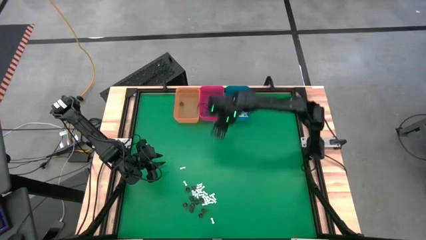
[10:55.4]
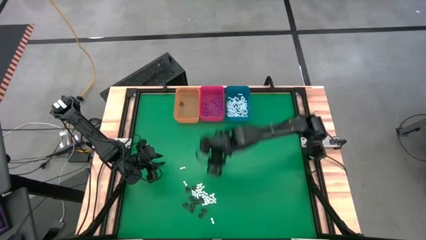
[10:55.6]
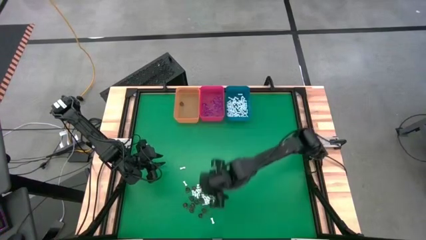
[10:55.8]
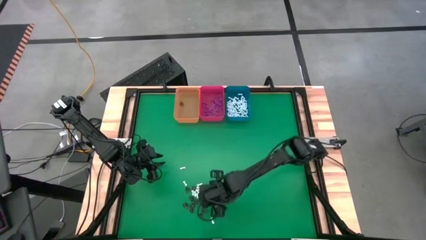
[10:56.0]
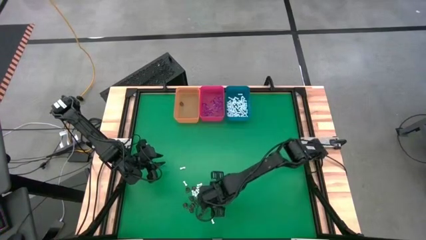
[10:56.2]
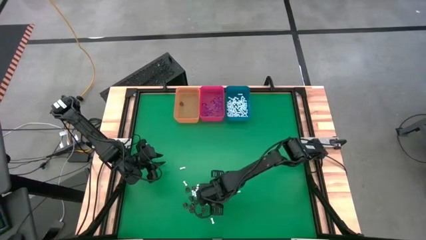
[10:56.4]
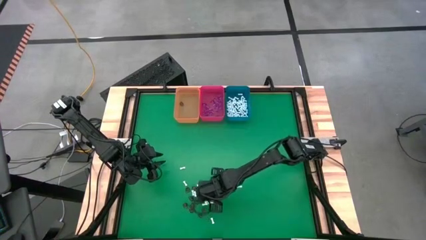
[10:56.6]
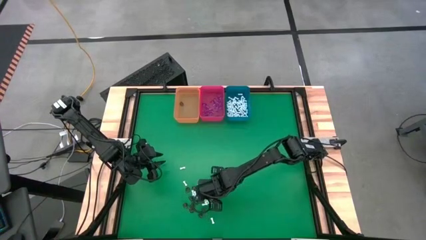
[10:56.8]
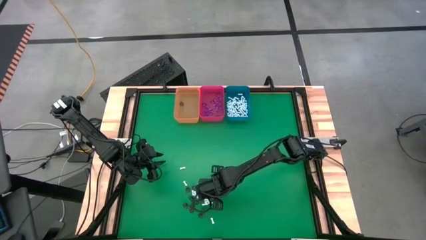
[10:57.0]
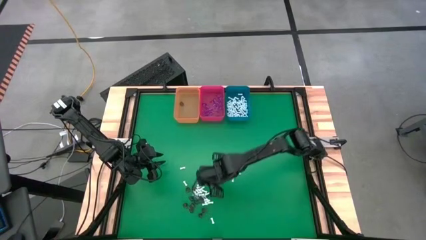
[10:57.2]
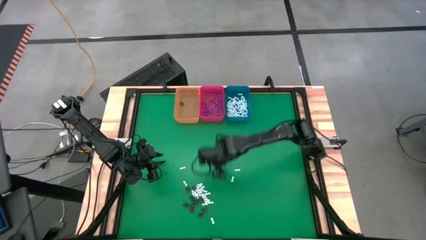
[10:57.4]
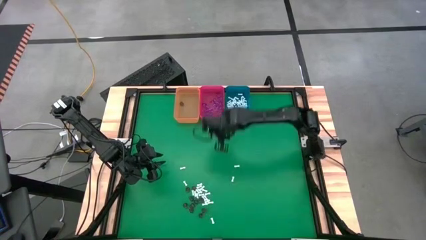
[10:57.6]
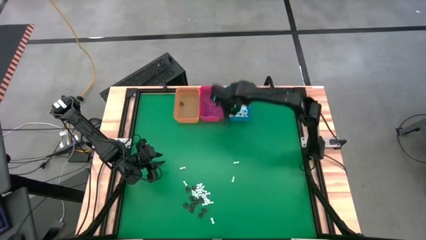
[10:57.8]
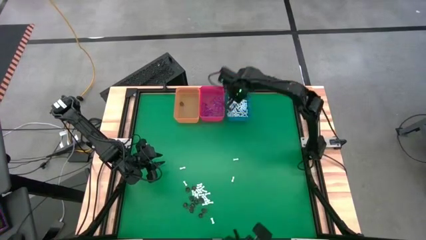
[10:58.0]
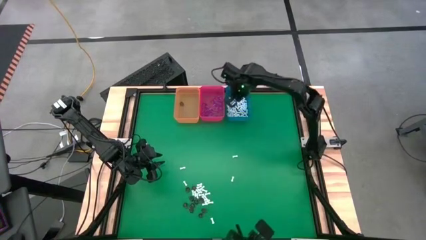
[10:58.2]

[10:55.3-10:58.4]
Task: Sort Halloween decoration
Put the white bone toy into the blue bin

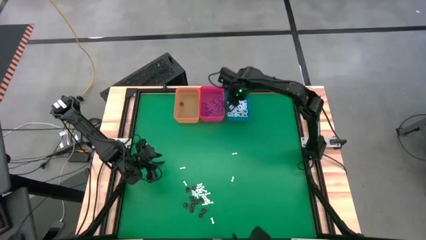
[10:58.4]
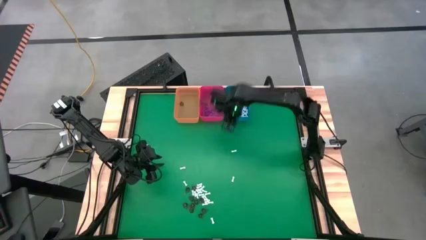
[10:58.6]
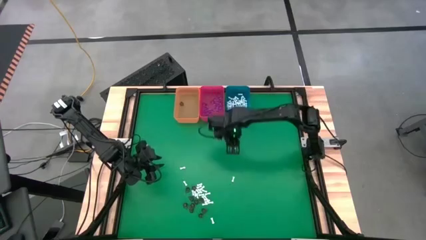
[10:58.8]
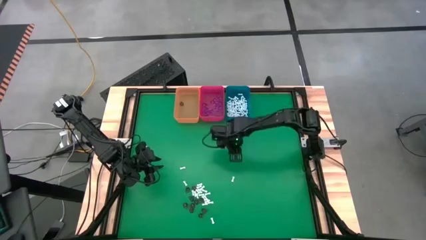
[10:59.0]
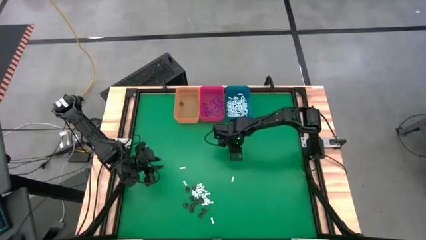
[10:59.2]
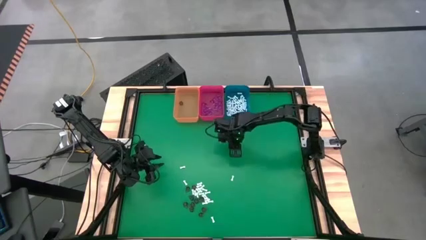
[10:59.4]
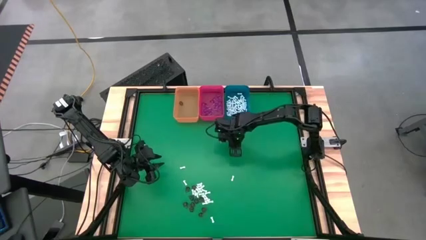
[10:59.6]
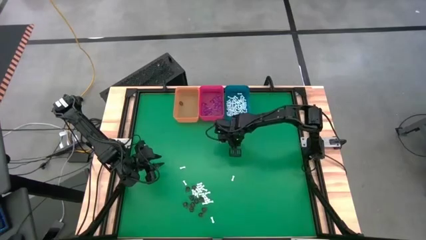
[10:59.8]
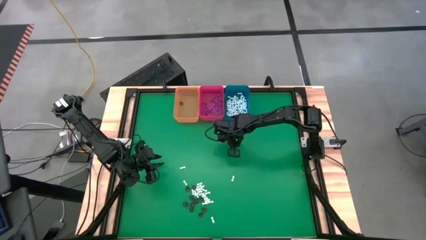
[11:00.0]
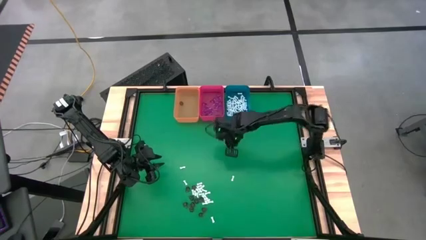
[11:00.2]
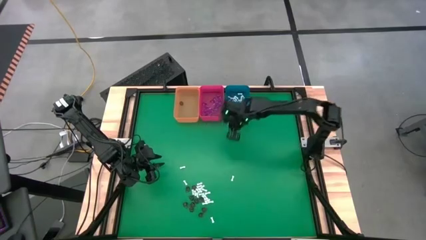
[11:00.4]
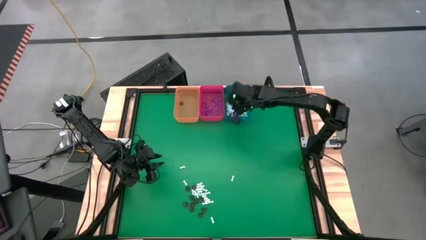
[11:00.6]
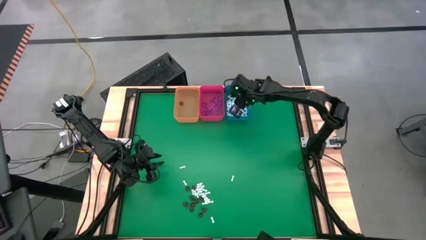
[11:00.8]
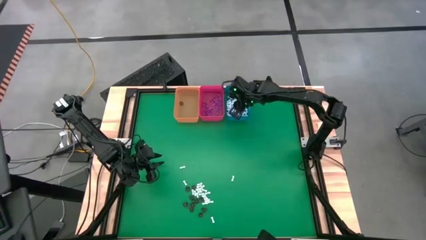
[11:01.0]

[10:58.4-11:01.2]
Put the white bone toy into the blue bin

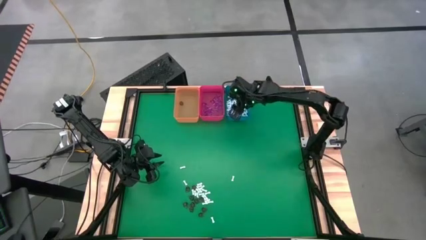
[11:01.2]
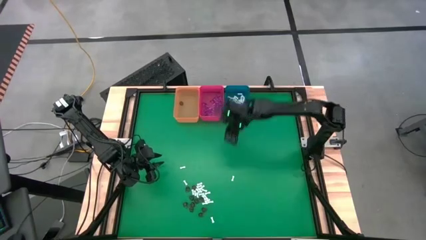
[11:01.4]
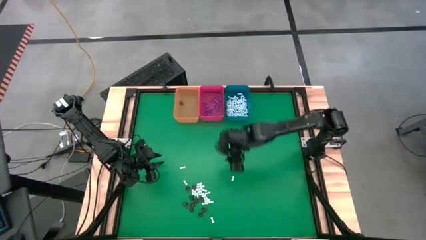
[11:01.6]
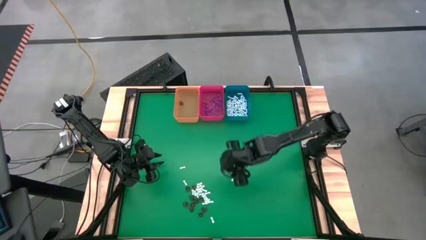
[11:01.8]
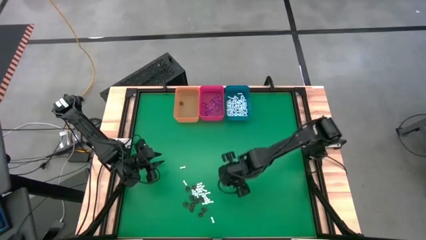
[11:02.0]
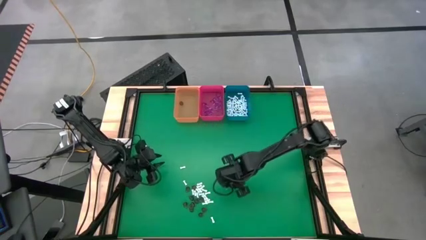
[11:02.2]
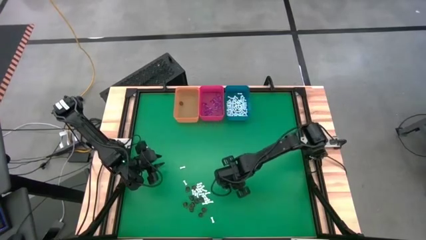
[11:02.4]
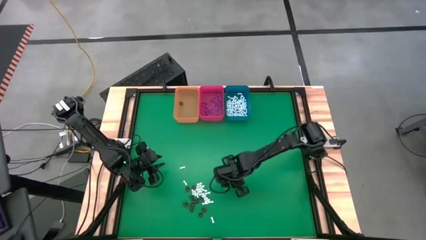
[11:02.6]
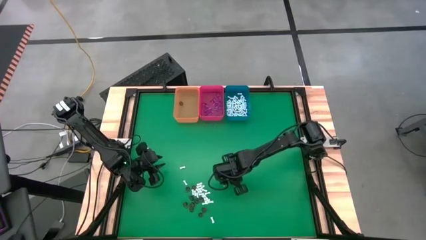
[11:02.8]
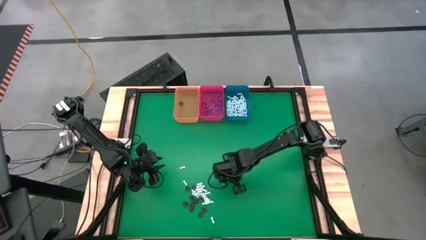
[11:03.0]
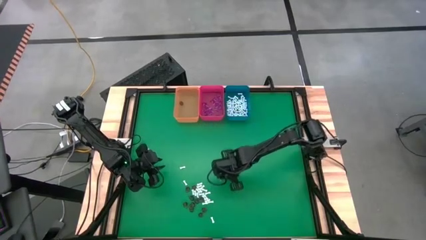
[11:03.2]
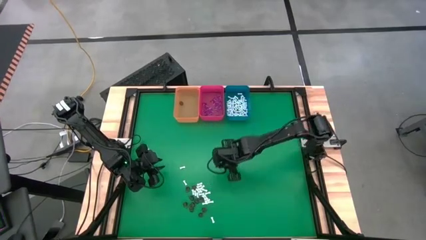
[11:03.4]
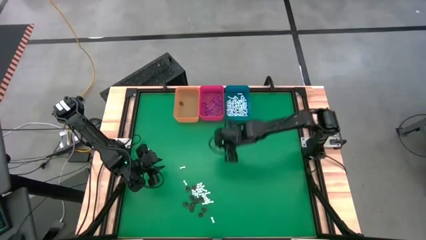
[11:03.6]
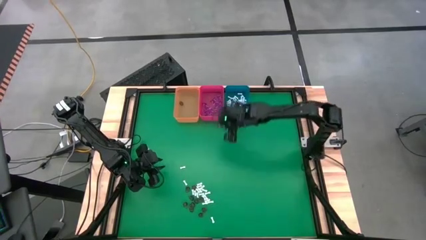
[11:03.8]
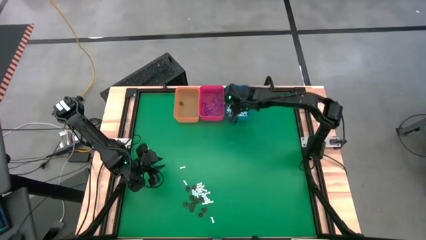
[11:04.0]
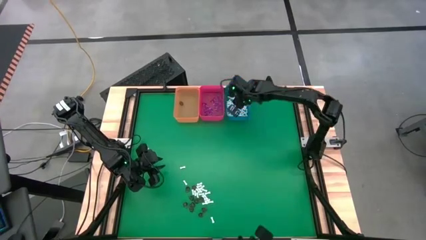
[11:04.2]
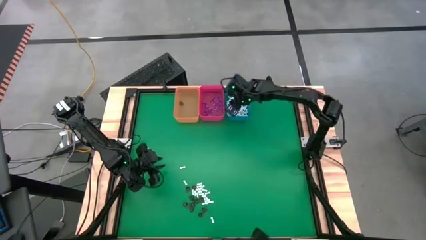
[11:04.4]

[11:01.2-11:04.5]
Put the white bone toy into the blue bin

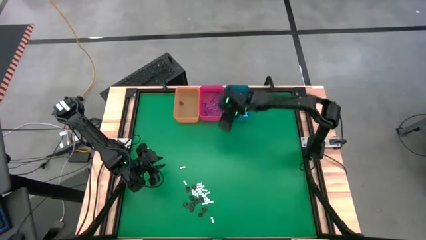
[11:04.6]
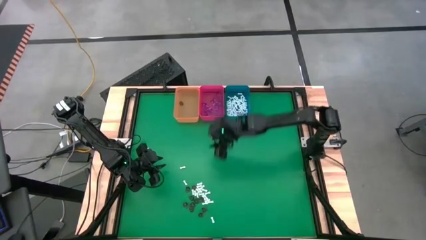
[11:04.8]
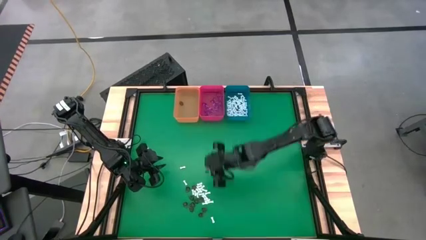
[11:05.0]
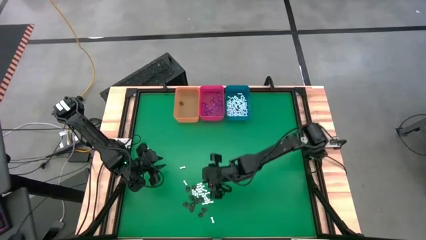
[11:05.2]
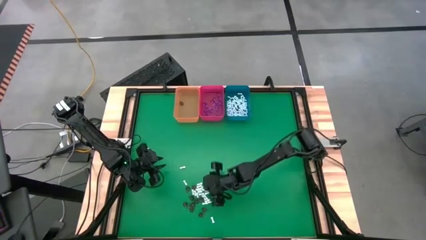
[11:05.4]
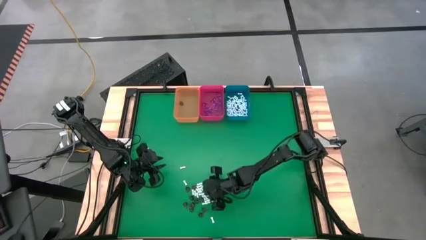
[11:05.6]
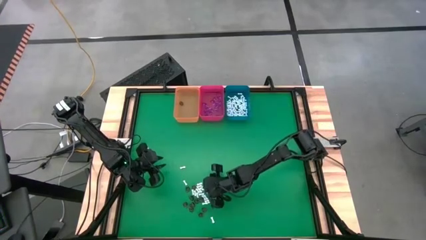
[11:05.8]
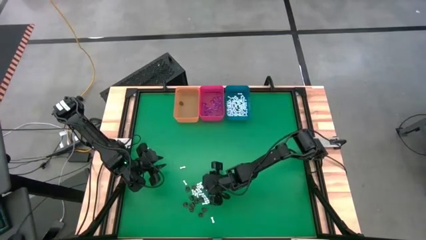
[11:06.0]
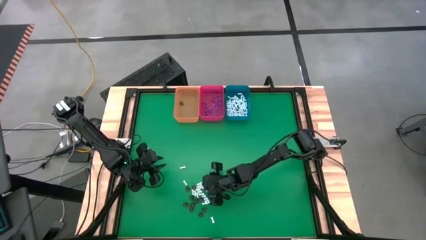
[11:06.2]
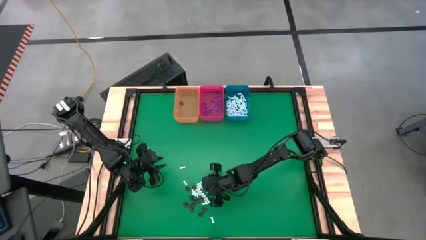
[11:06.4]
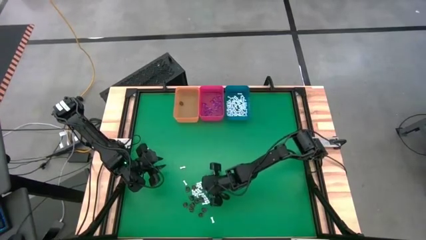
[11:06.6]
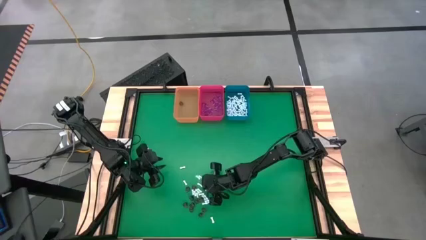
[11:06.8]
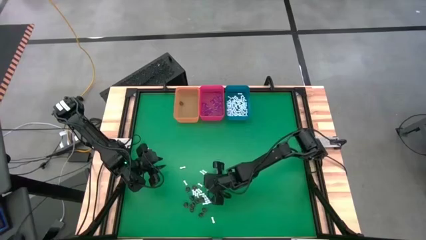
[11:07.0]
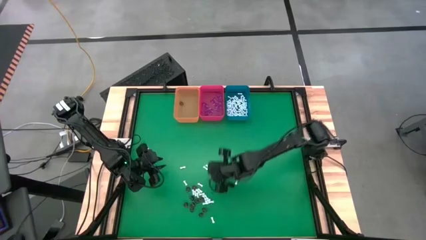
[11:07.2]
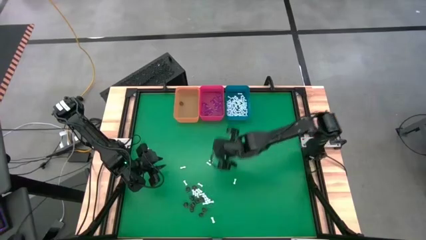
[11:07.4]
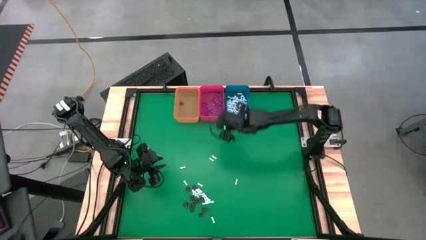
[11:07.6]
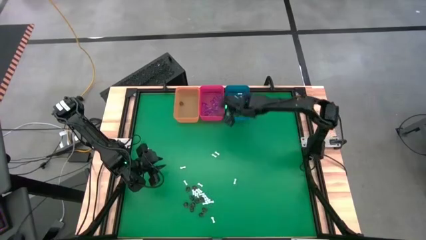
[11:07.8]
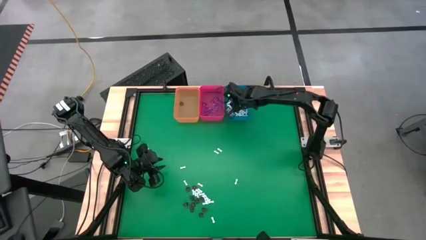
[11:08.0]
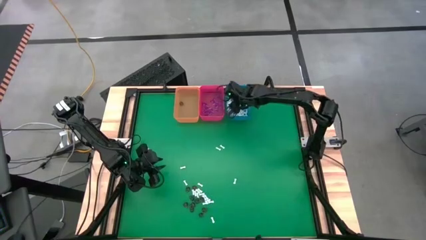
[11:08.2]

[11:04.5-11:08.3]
Put the white bone toy into the blue bin

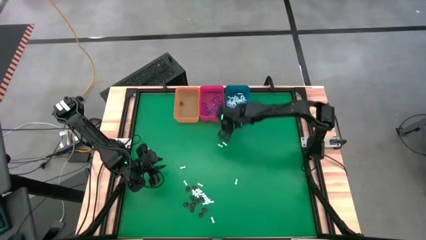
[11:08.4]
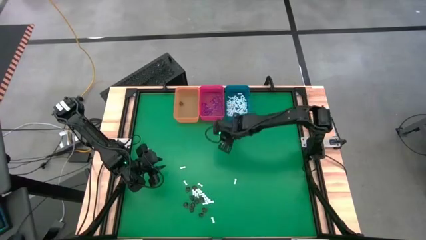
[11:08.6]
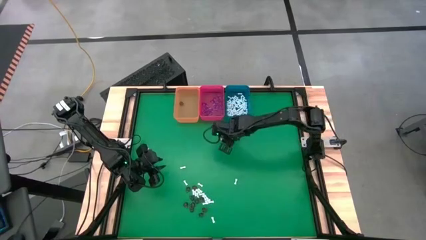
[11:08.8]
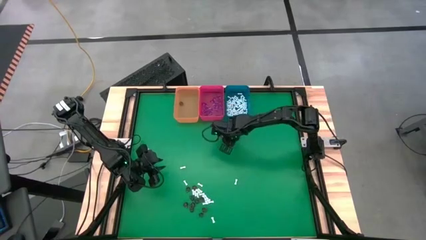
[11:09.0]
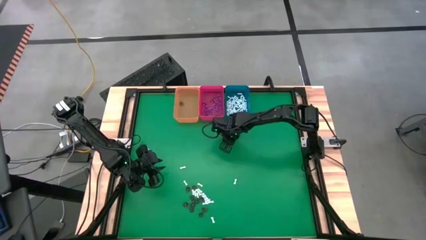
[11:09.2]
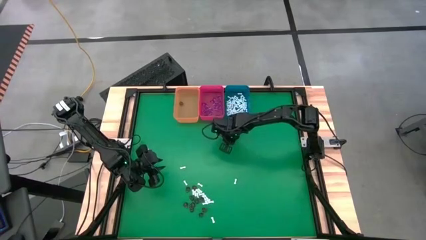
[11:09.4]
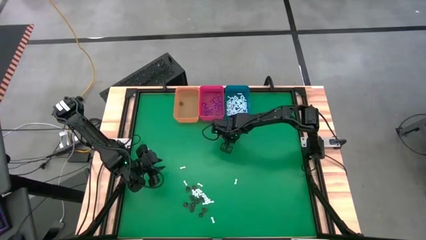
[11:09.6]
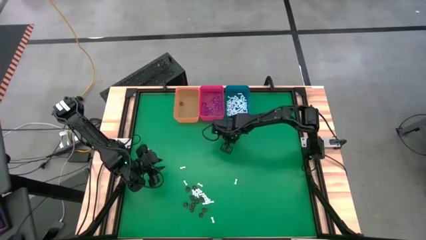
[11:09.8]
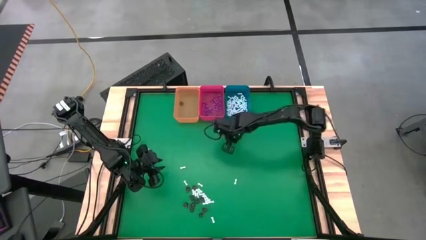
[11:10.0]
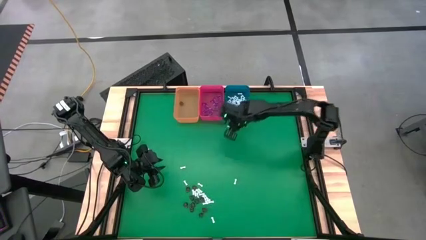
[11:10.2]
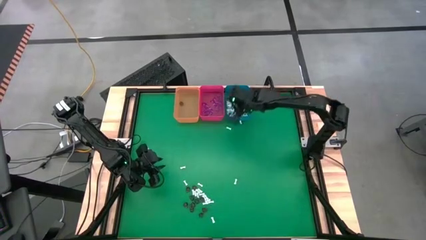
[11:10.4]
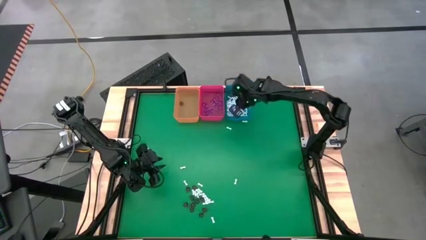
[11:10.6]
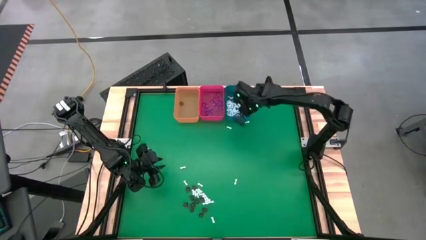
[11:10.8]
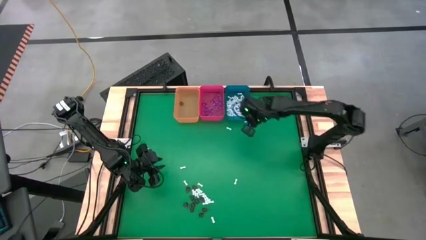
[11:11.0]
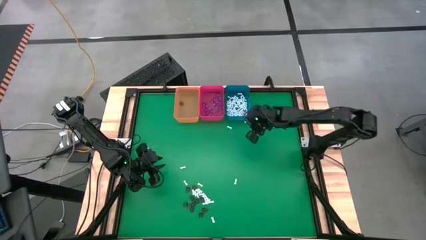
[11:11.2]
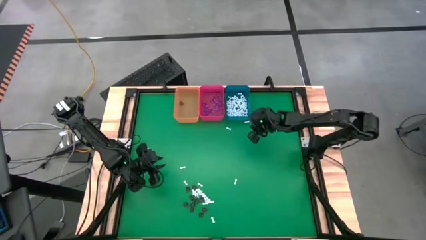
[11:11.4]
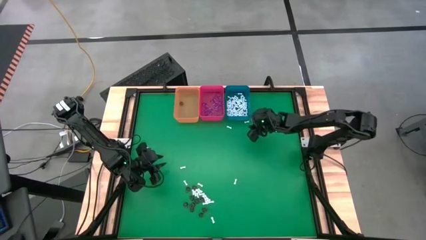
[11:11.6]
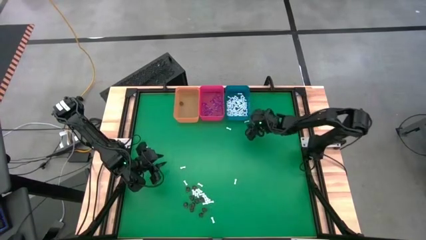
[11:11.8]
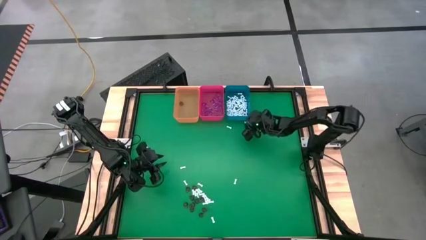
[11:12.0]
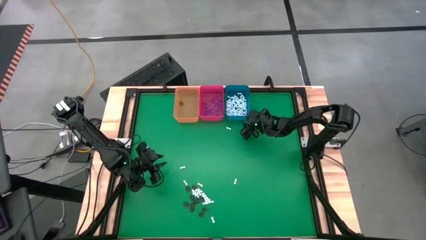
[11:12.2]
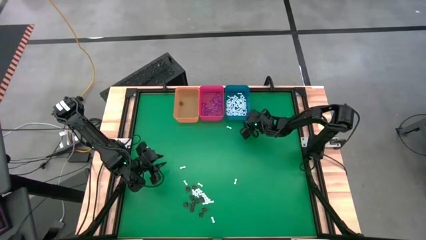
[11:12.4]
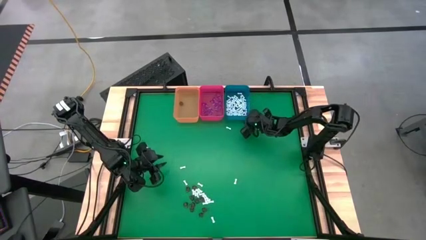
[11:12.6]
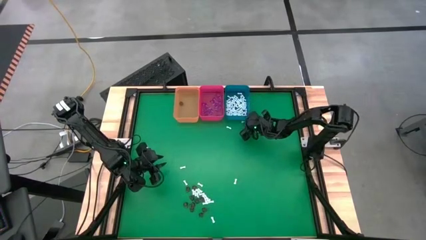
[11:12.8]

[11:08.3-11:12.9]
Put the white bone toy into the blue bin

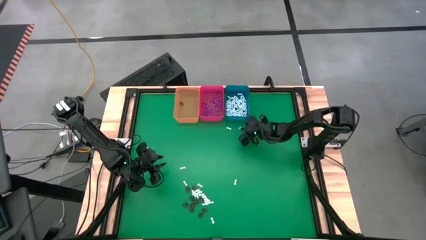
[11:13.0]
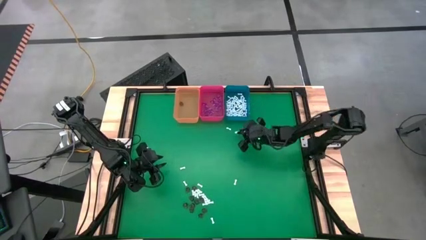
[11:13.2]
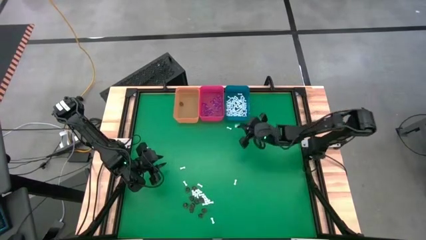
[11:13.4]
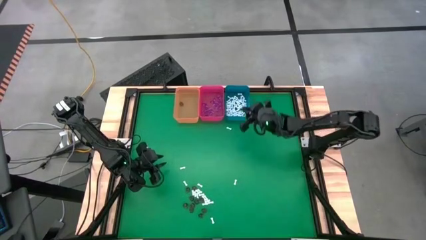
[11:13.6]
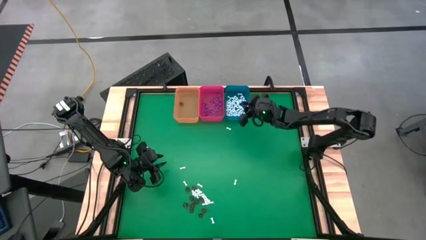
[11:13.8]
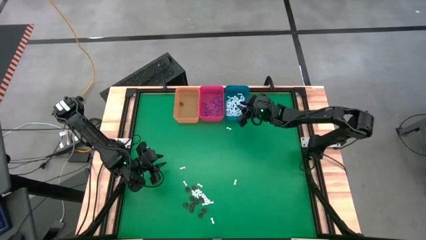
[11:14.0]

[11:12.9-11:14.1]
Put the white bone toy into the blue bin
